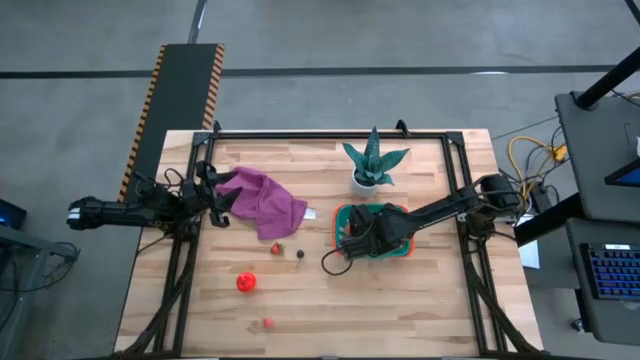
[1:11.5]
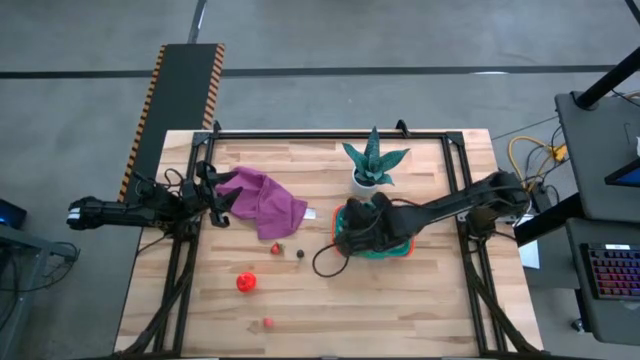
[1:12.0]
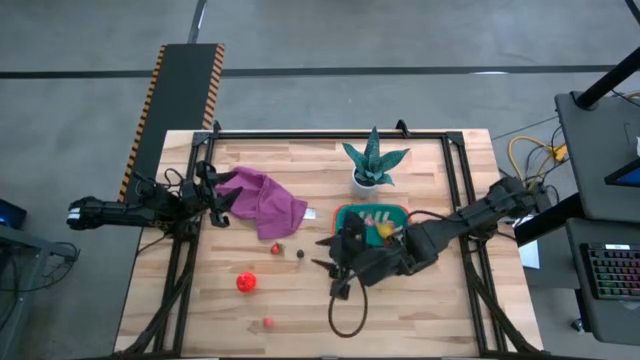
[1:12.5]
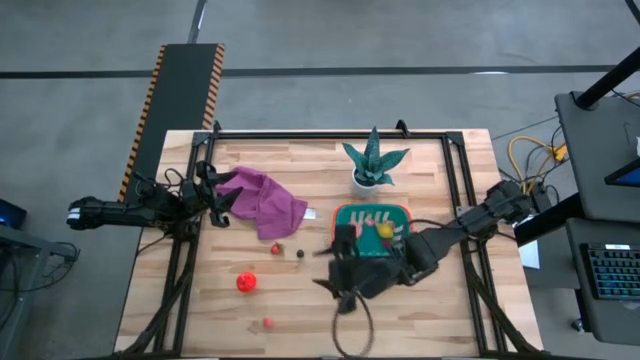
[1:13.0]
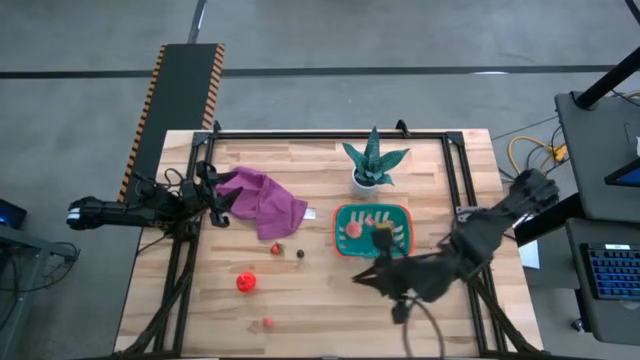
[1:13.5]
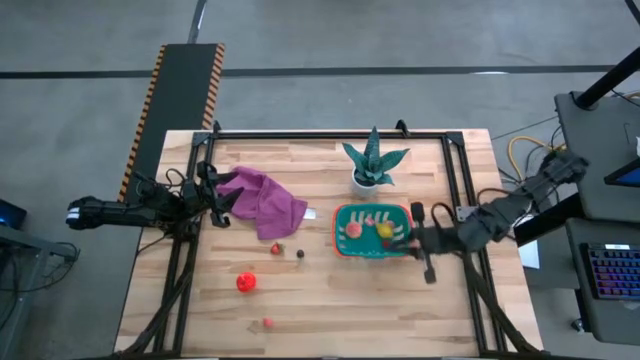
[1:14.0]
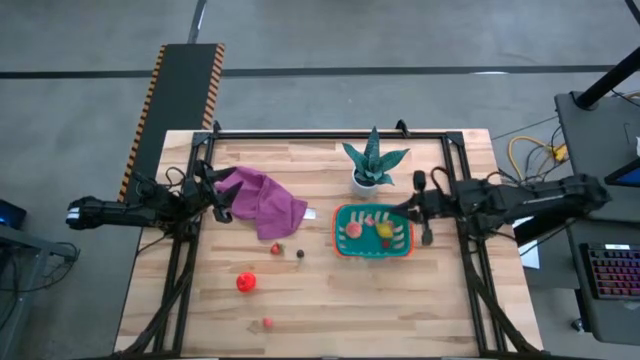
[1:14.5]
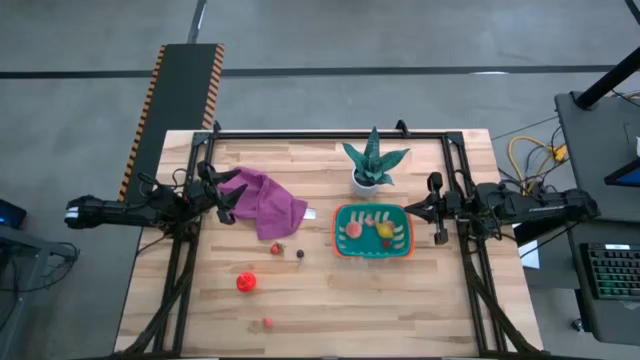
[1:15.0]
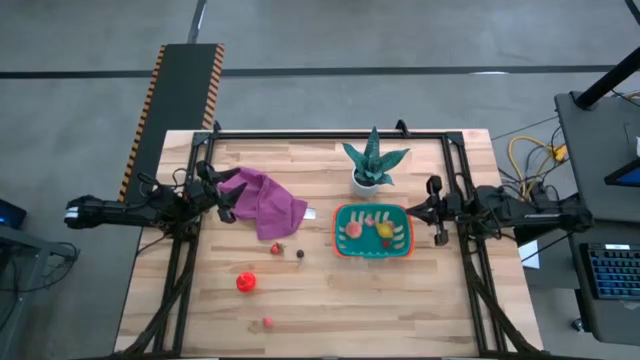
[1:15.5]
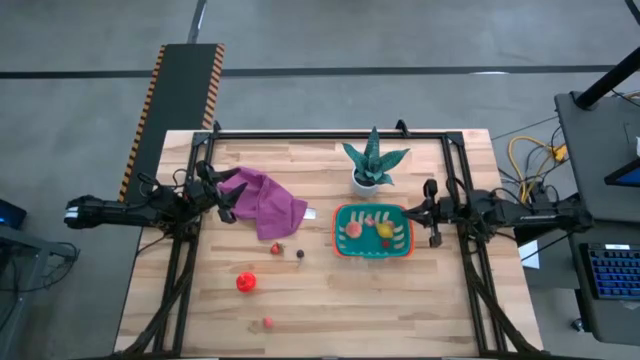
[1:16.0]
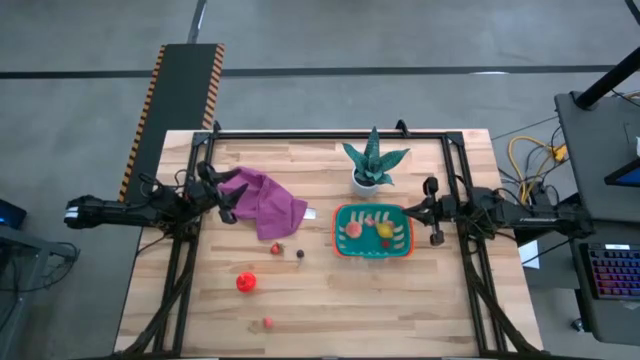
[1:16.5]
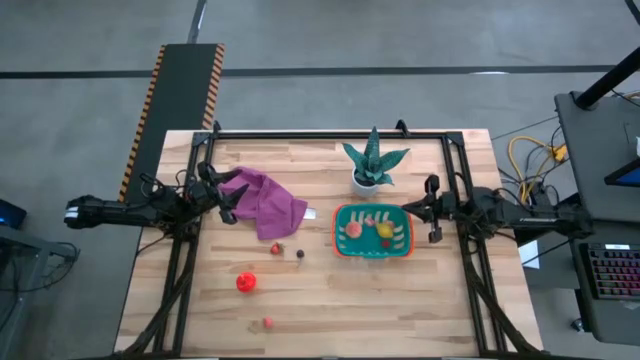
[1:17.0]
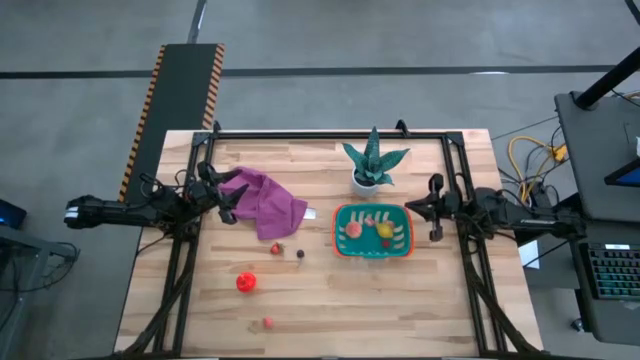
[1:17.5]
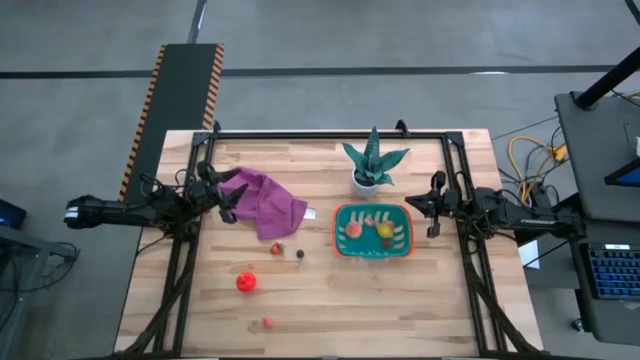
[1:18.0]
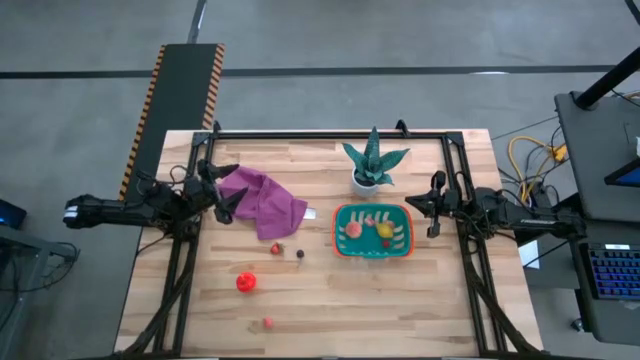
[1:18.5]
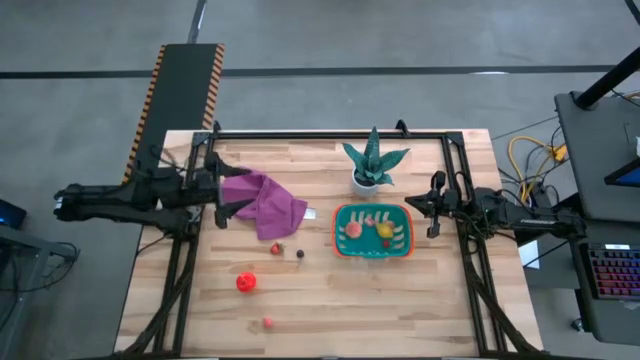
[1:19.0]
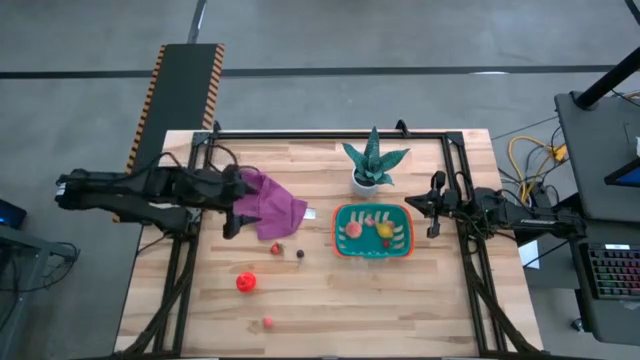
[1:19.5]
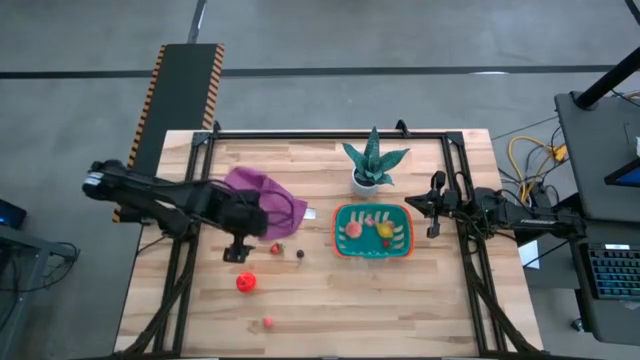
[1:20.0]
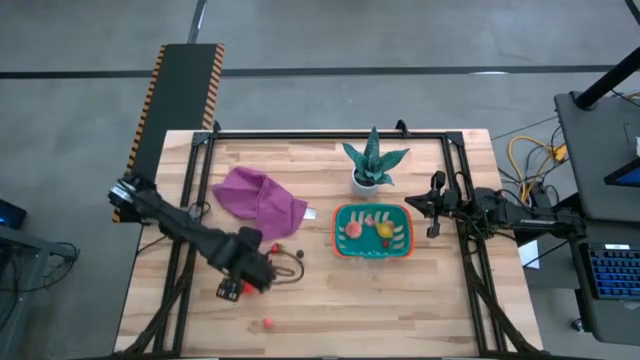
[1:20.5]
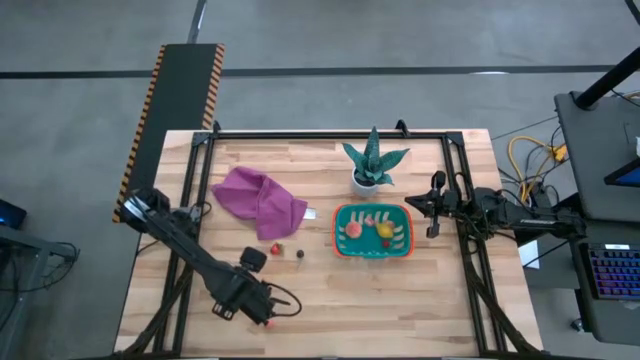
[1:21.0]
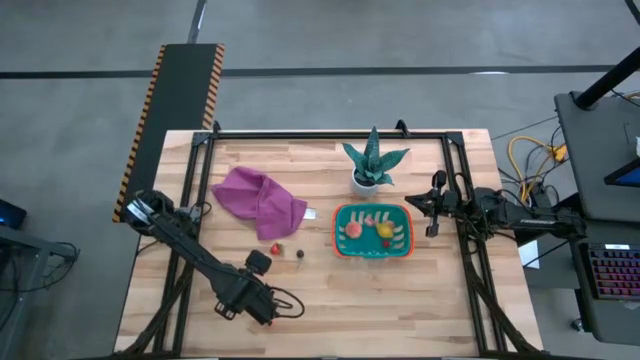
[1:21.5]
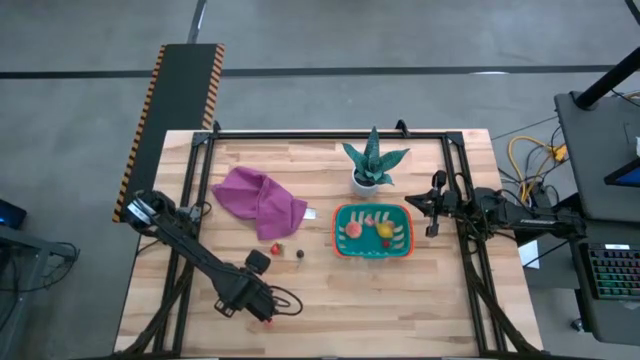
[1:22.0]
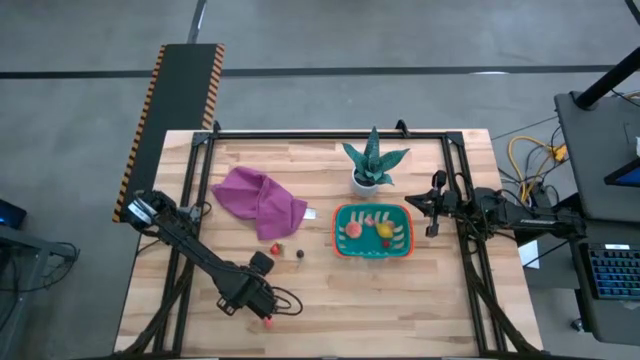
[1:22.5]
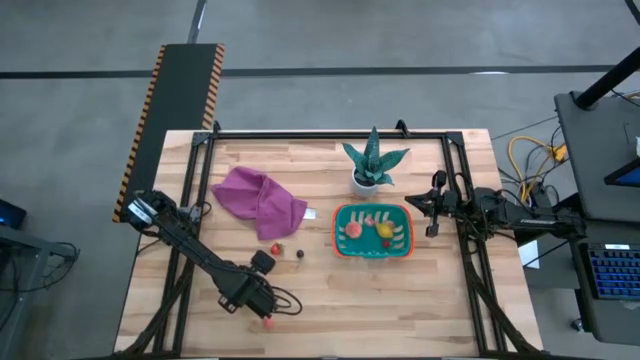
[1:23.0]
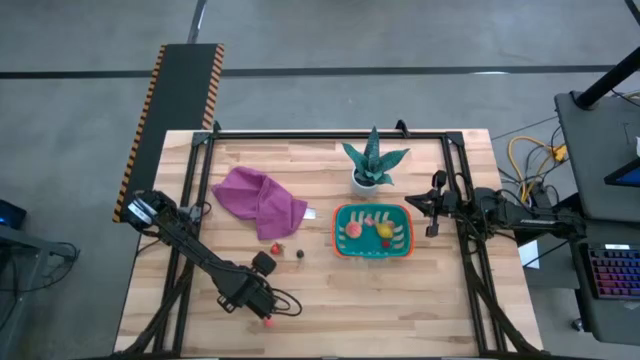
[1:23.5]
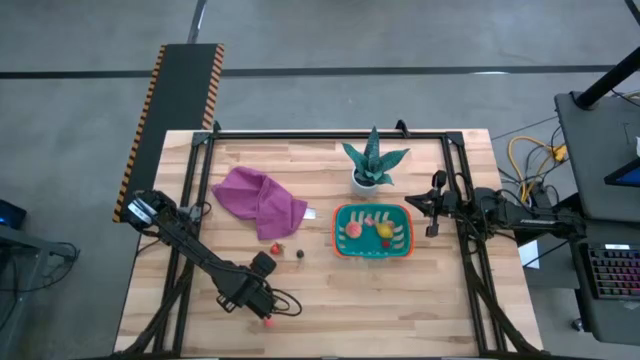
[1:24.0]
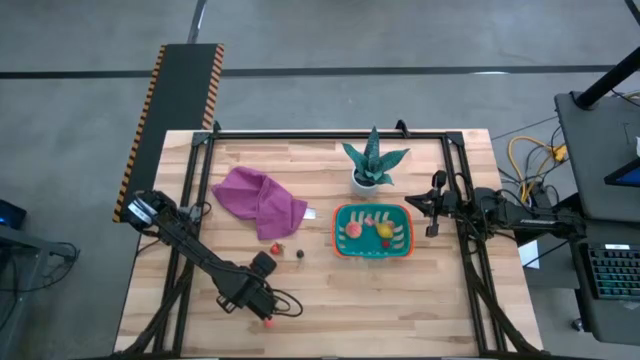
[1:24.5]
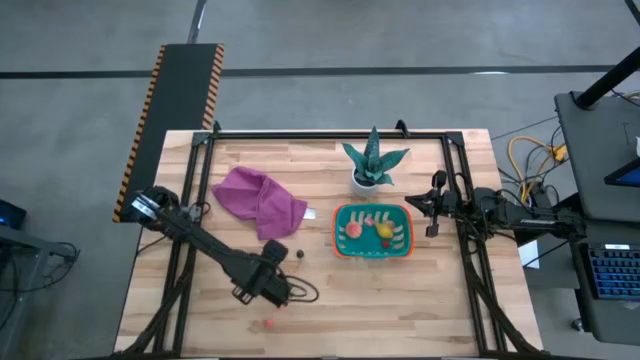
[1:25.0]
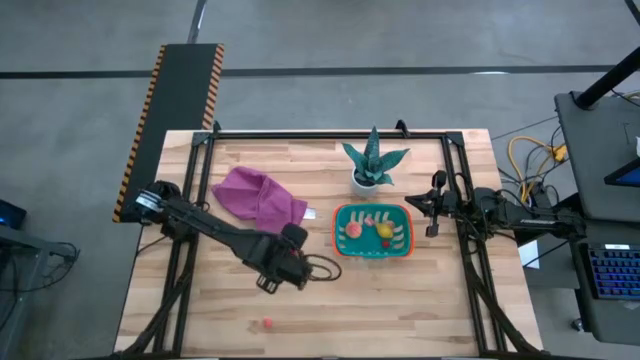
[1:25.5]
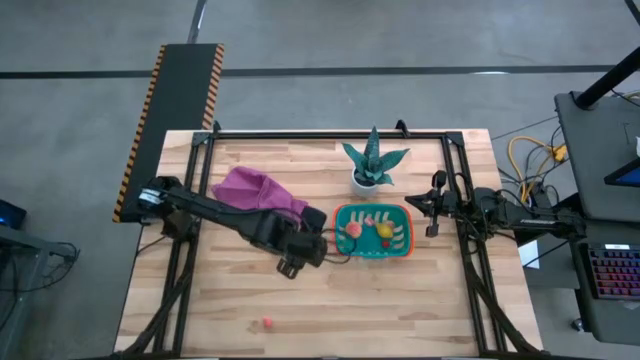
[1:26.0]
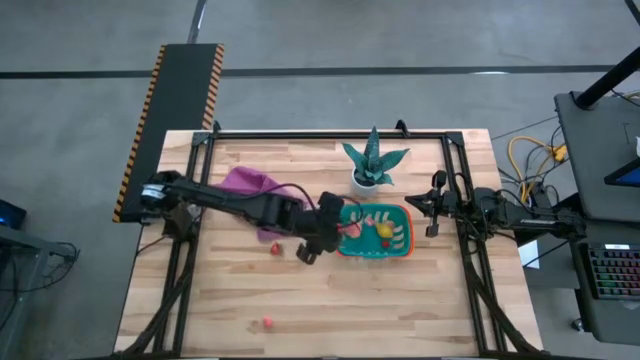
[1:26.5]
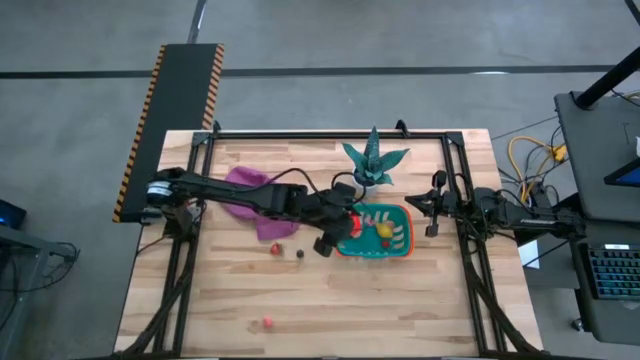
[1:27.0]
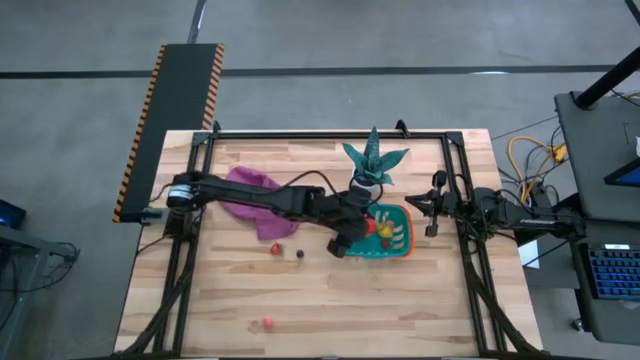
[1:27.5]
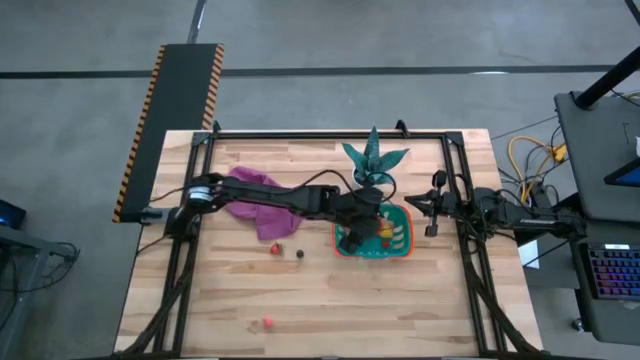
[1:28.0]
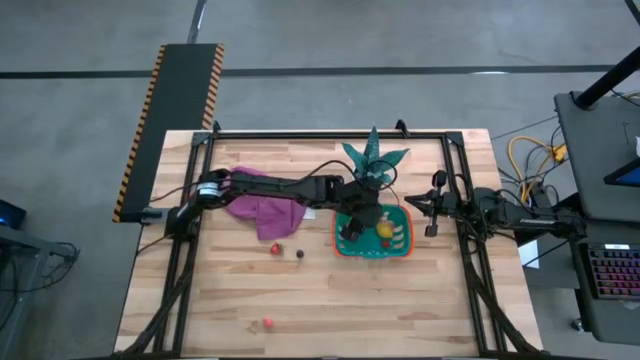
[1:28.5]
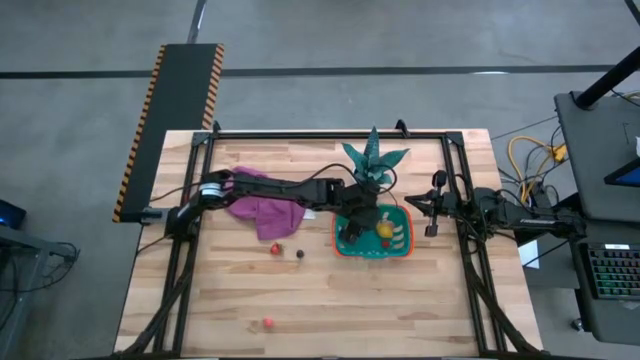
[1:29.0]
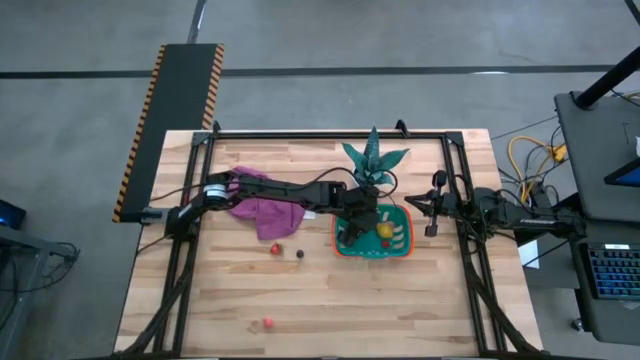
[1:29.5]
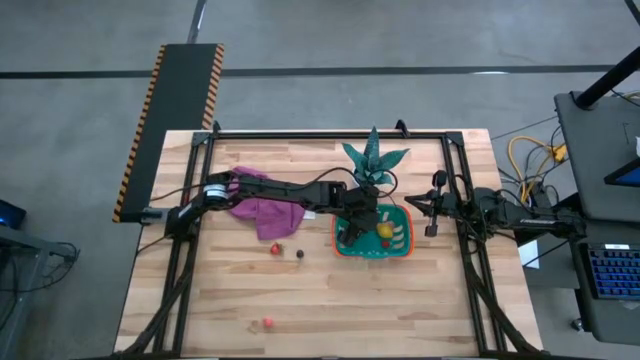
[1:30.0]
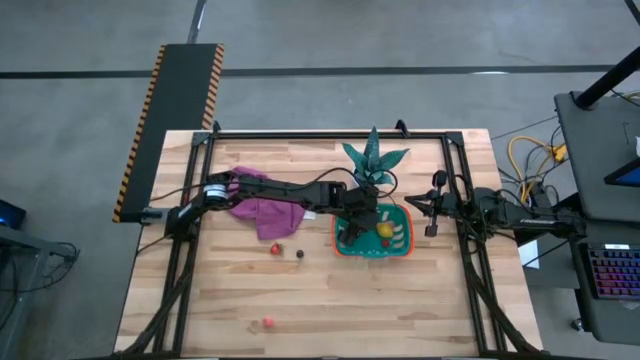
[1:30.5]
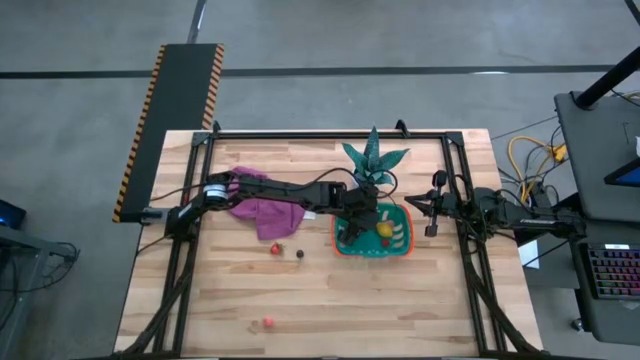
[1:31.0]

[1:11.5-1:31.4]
Task: Pick and placing Produce into tupperware
Put the apple into the green basket
